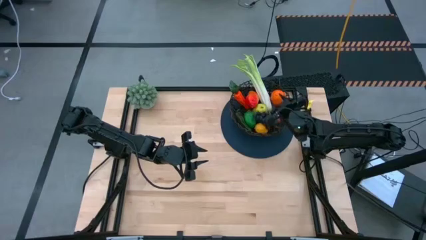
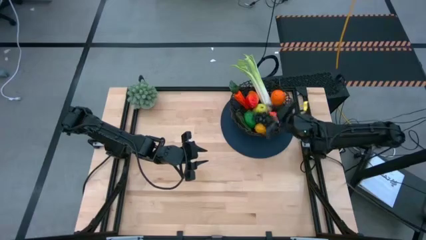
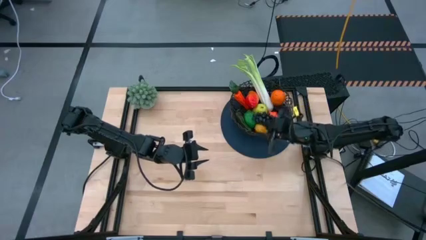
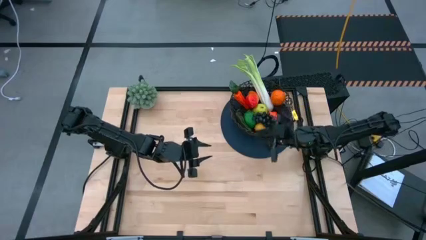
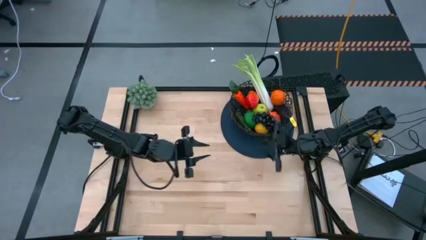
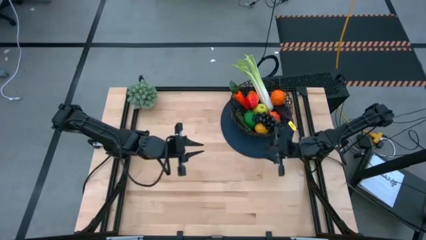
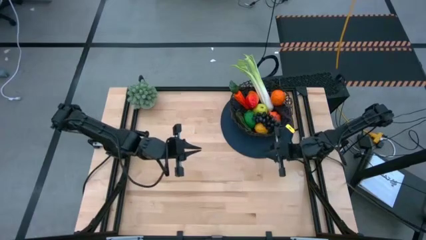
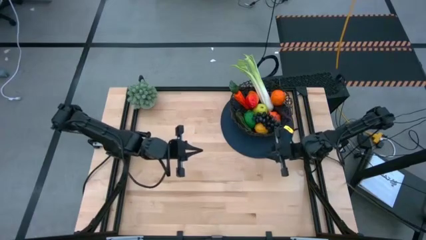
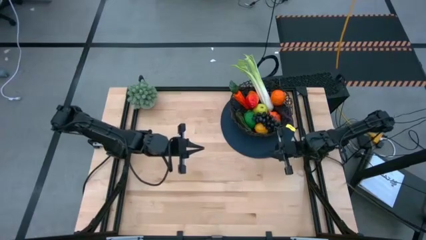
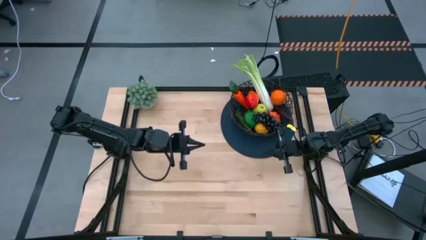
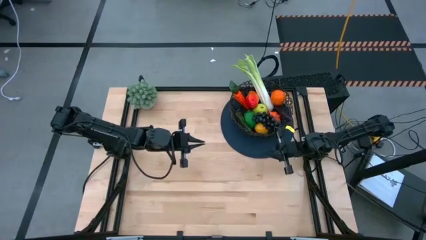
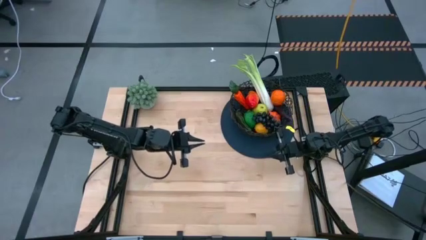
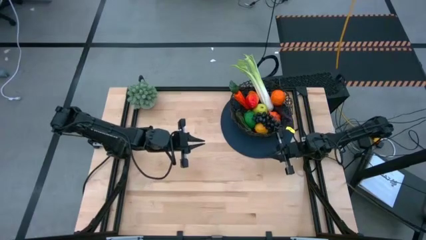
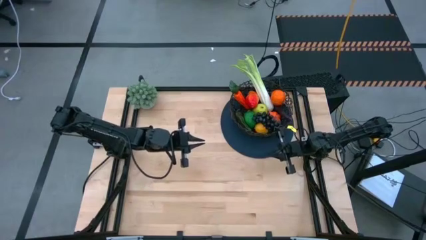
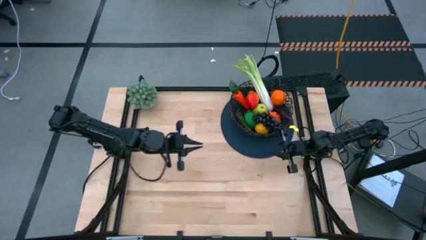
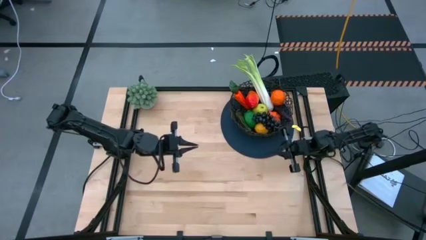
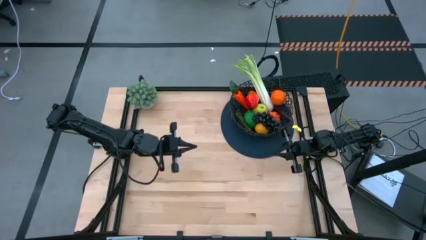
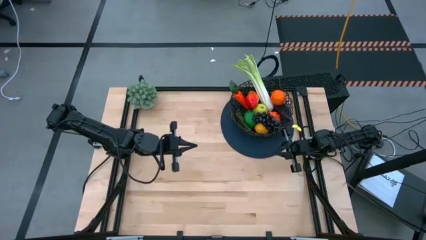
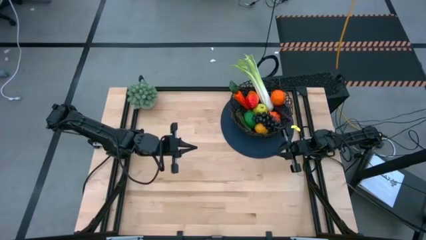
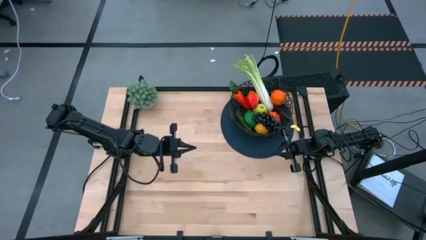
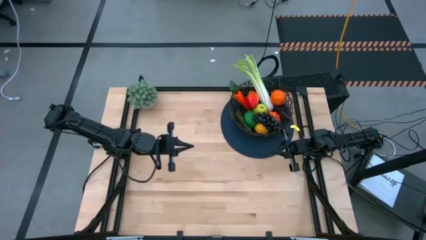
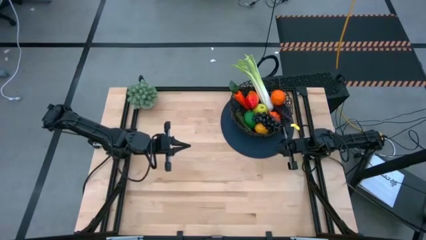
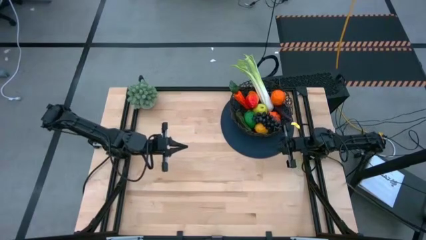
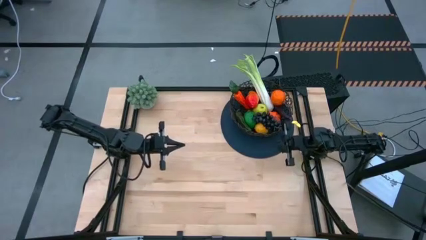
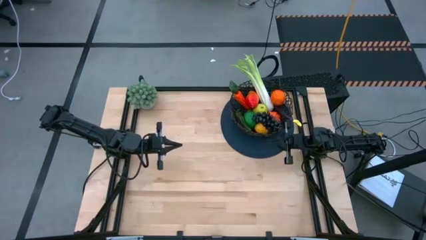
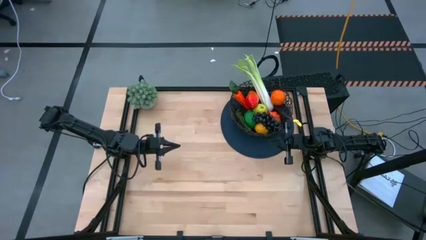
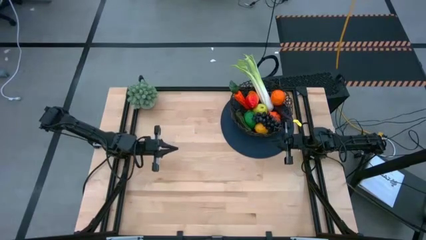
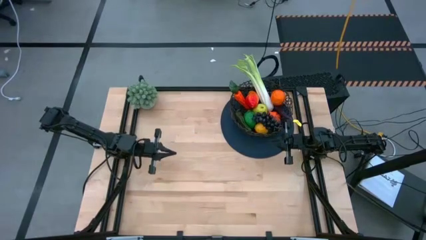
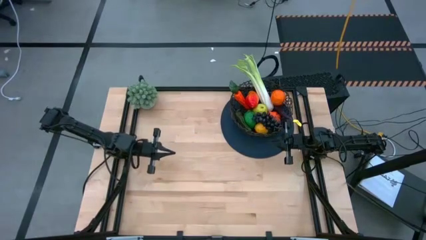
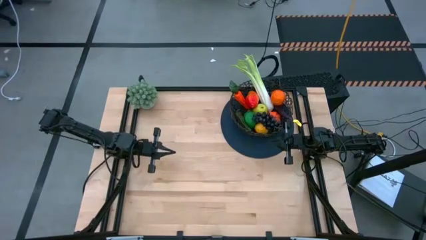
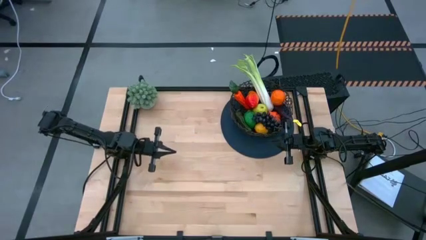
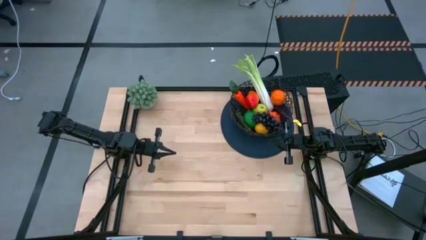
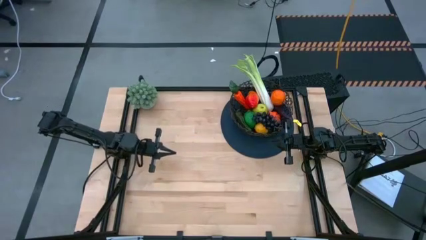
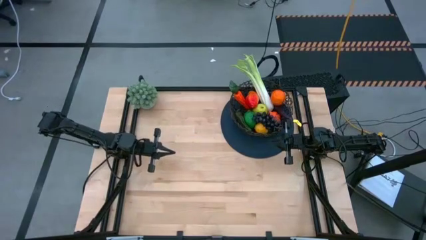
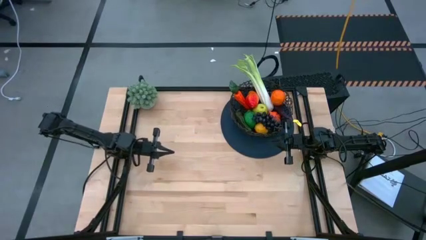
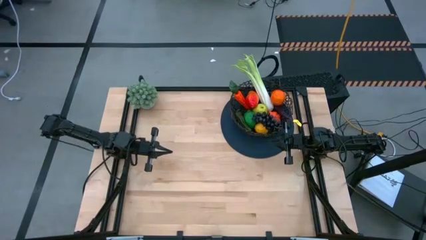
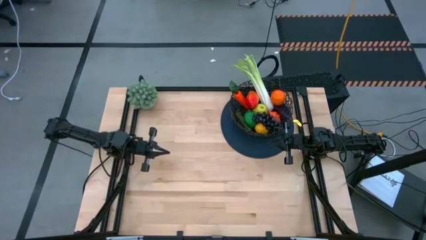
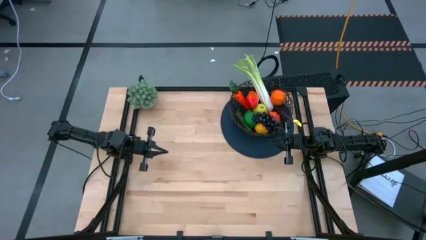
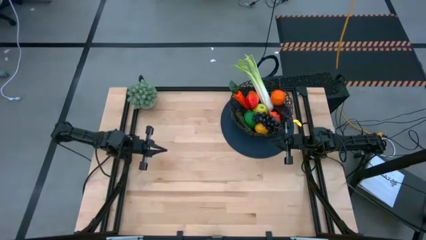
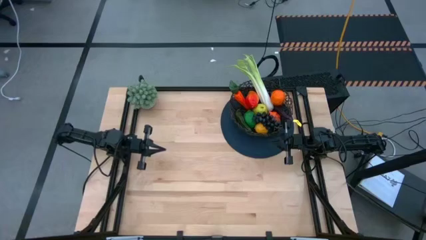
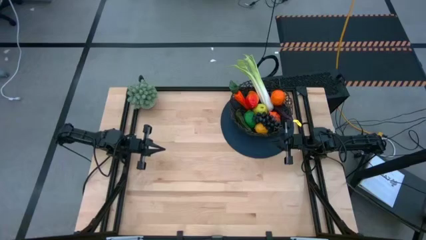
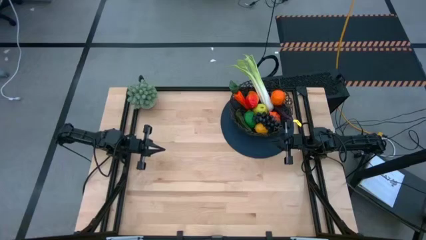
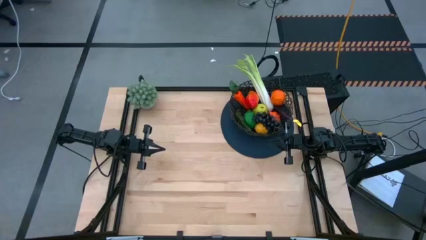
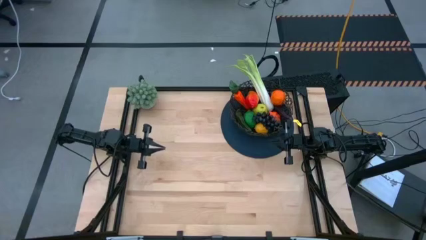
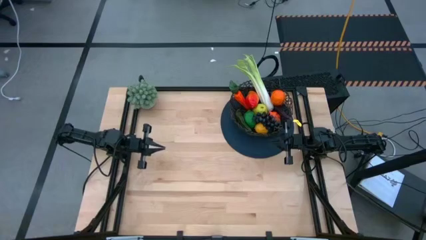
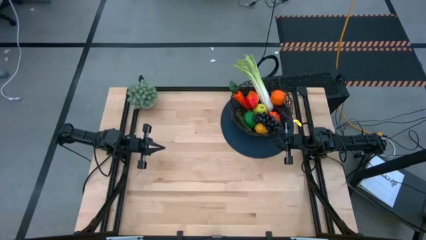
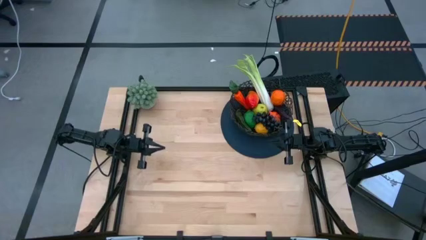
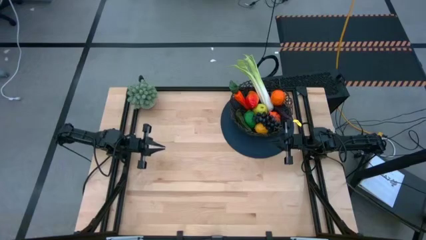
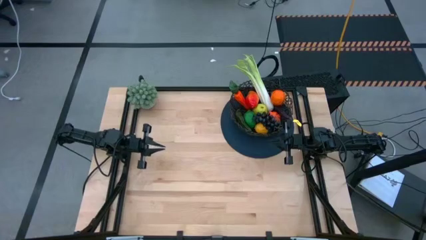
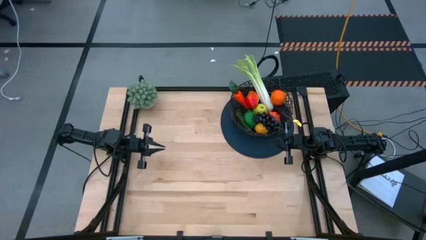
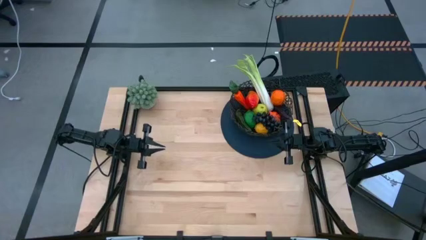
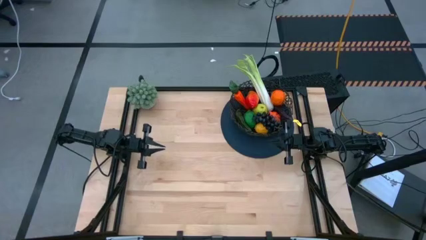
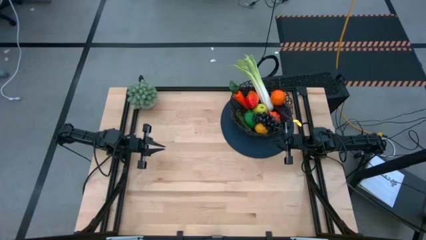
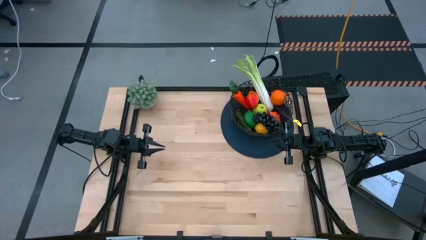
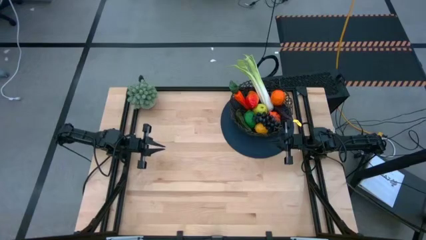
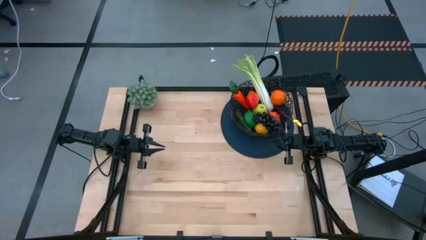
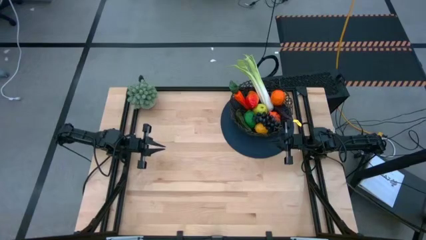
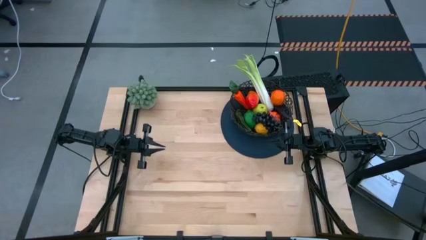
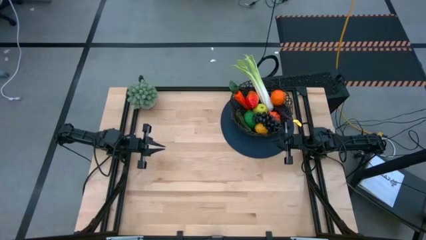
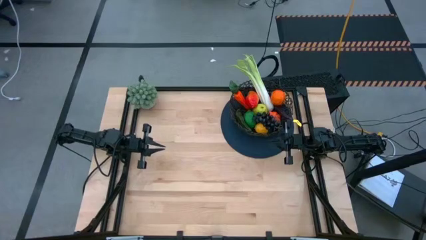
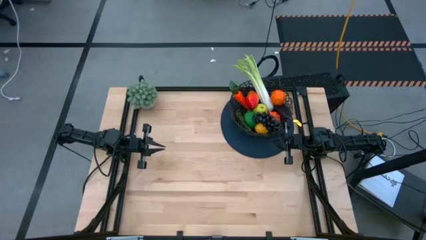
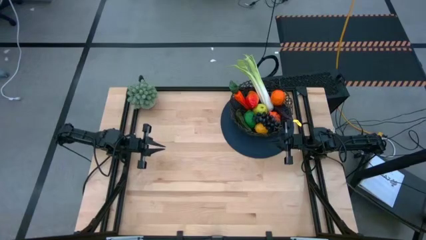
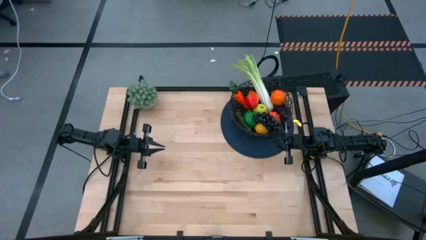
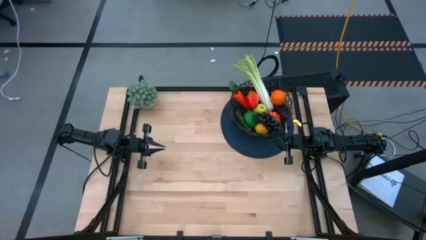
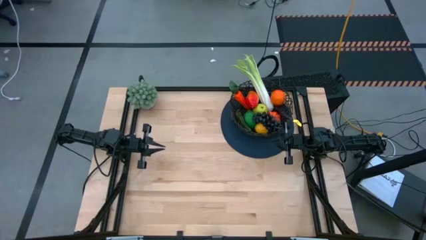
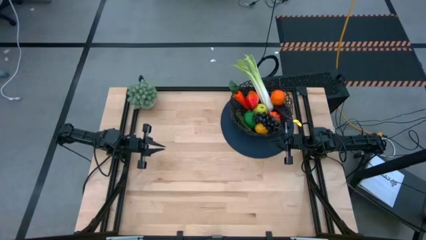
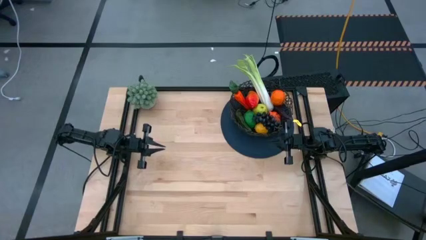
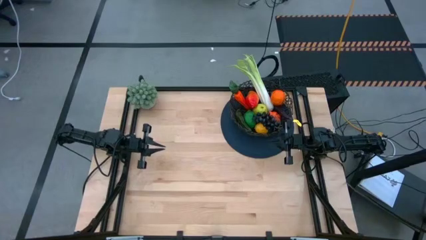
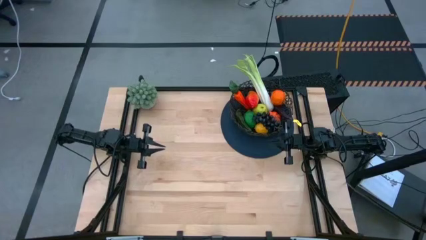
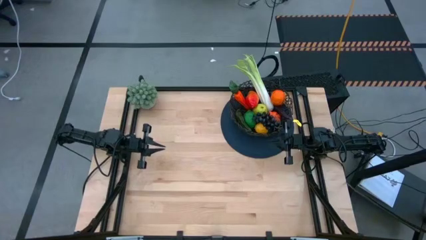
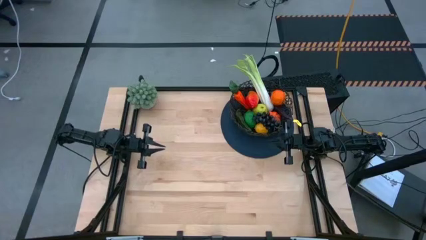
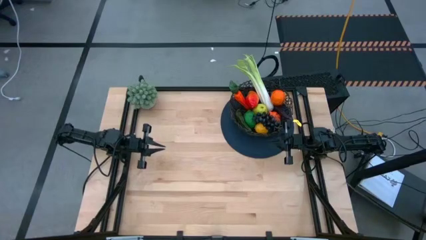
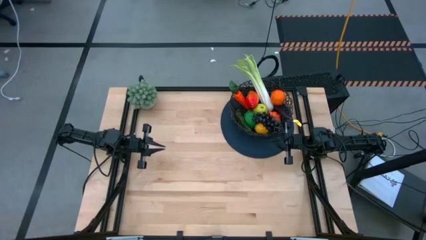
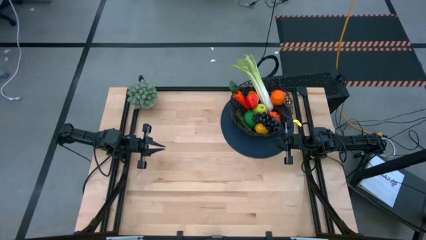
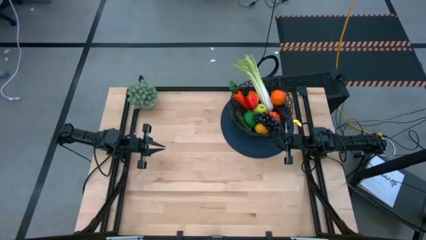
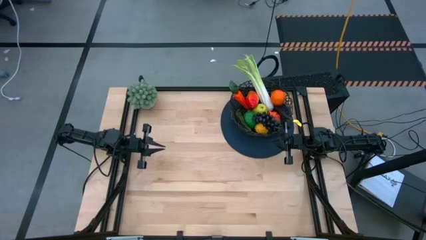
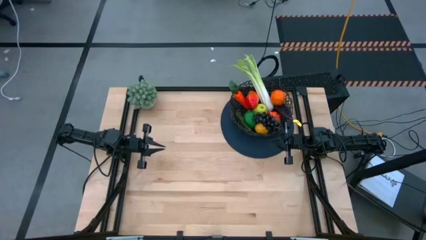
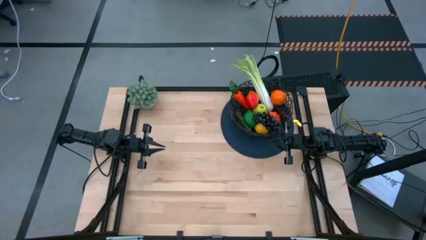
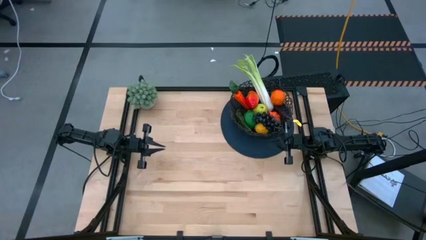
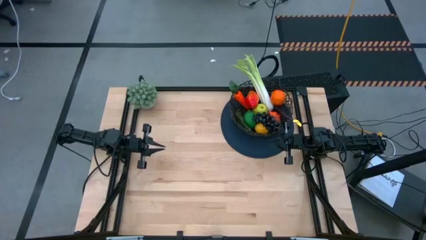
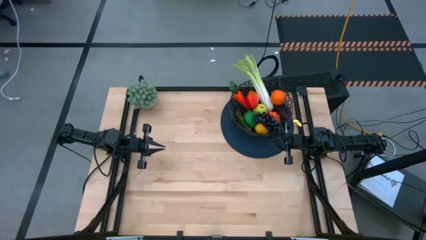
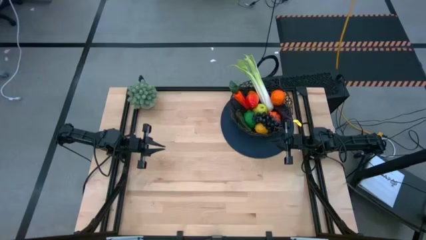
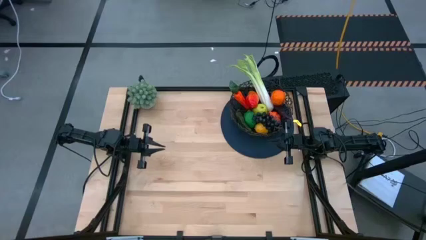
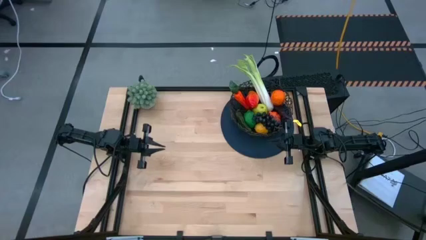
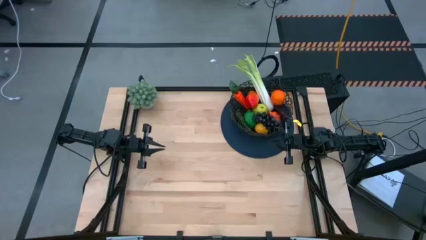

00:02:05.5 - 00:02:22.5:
Task: Build produce basket
Return to Home Position
